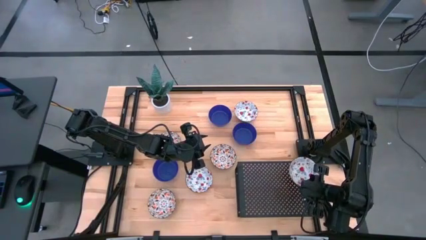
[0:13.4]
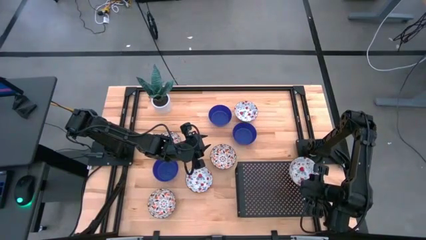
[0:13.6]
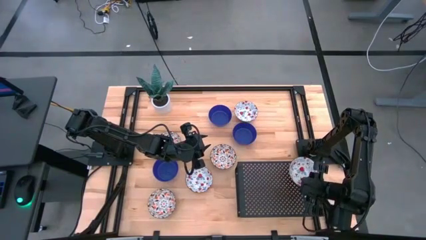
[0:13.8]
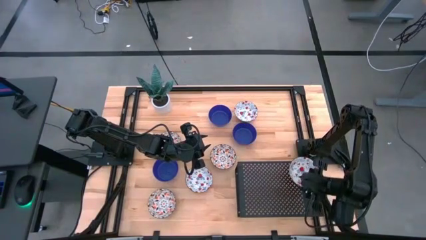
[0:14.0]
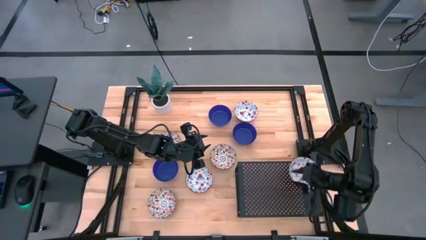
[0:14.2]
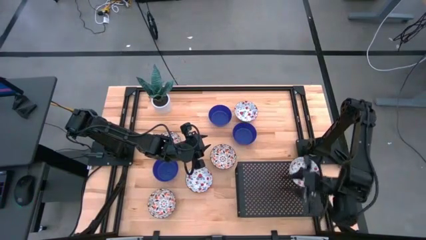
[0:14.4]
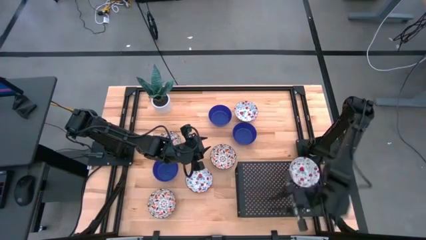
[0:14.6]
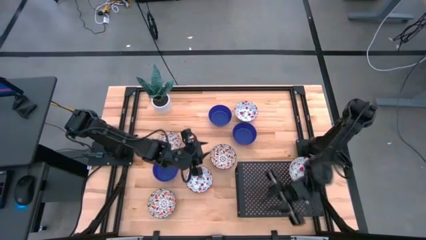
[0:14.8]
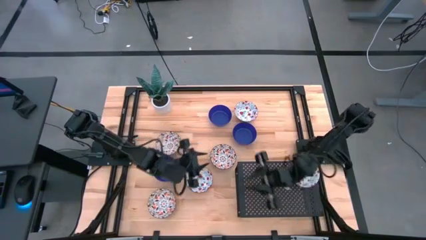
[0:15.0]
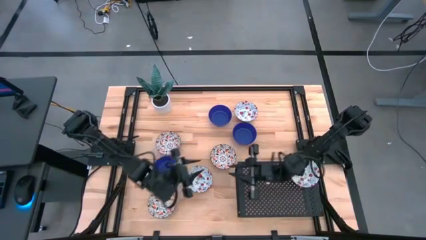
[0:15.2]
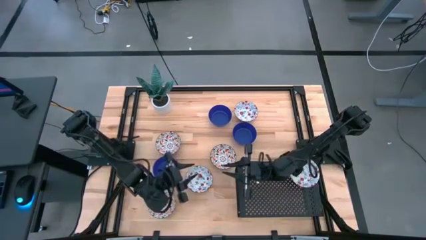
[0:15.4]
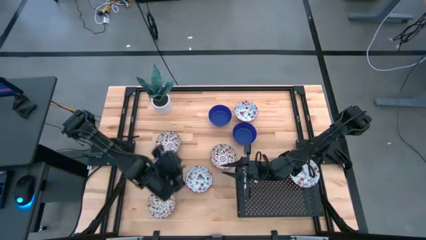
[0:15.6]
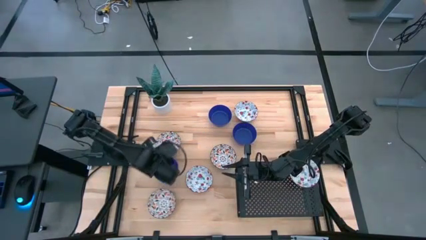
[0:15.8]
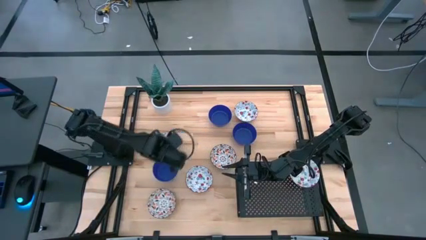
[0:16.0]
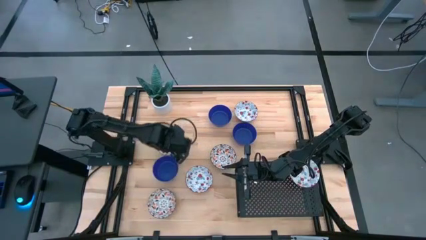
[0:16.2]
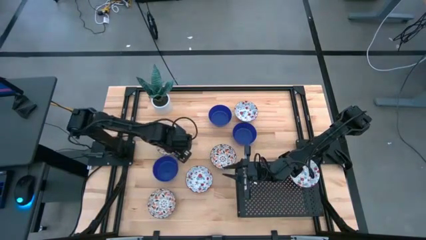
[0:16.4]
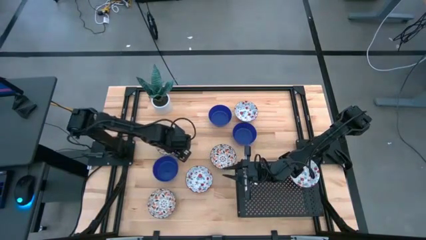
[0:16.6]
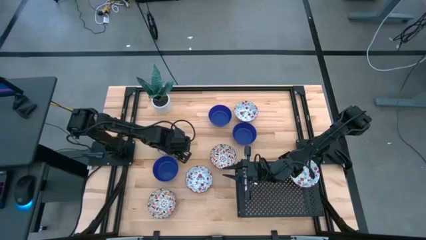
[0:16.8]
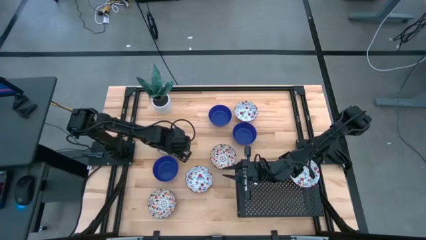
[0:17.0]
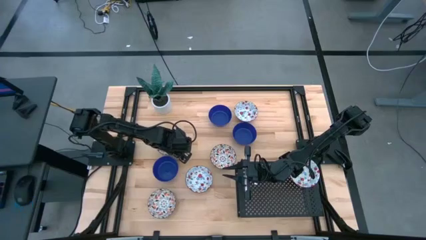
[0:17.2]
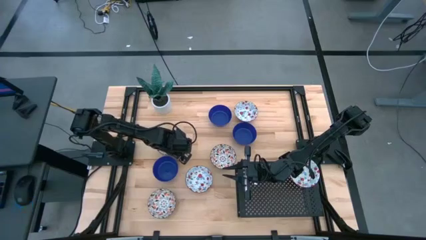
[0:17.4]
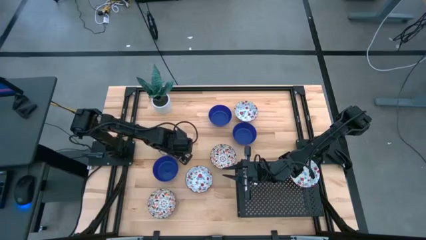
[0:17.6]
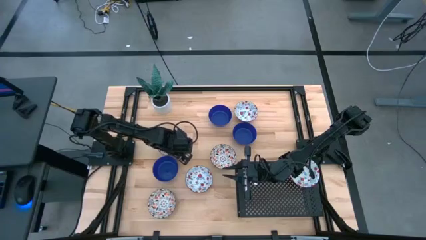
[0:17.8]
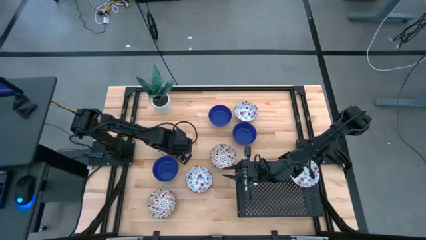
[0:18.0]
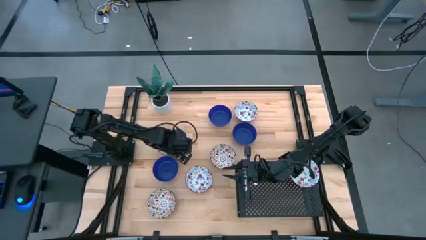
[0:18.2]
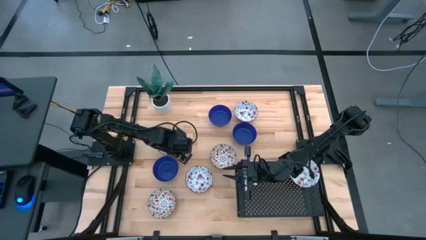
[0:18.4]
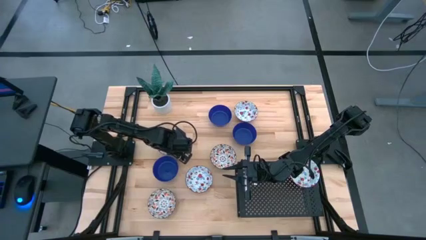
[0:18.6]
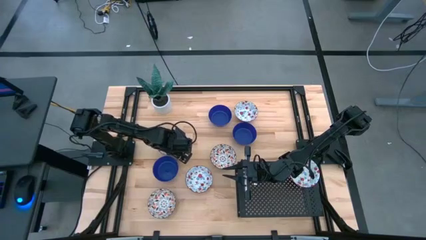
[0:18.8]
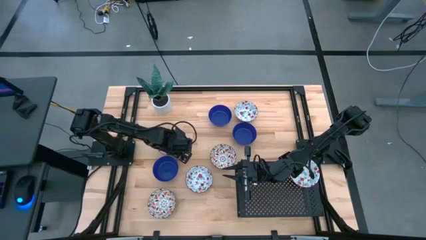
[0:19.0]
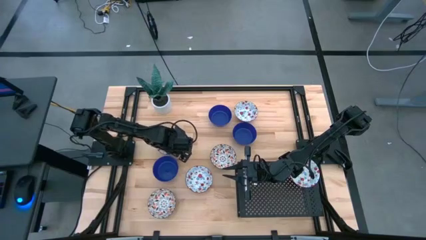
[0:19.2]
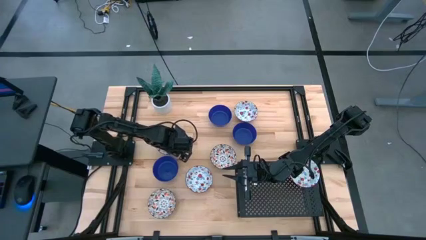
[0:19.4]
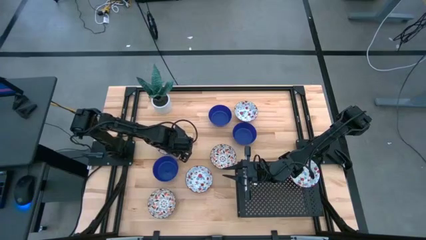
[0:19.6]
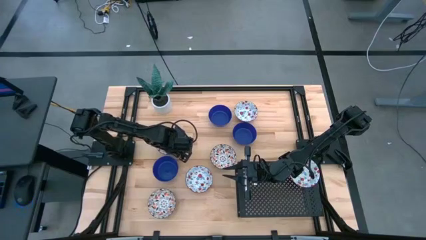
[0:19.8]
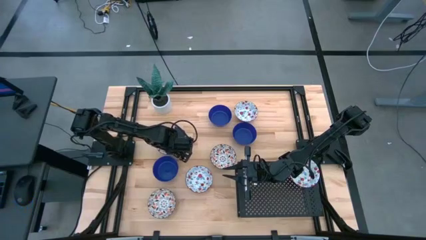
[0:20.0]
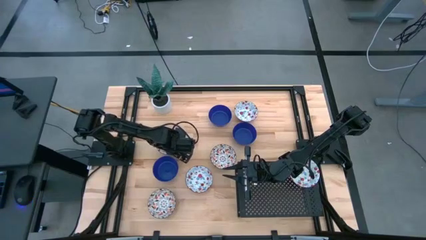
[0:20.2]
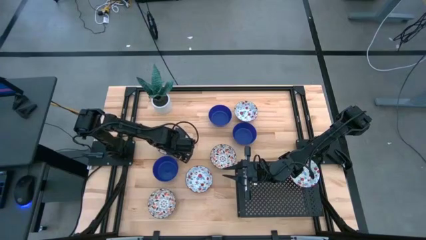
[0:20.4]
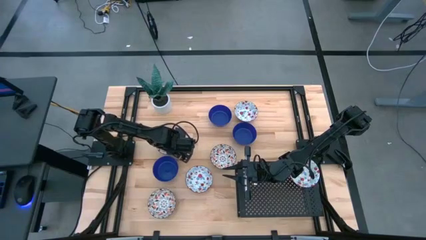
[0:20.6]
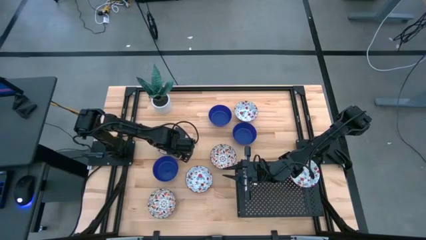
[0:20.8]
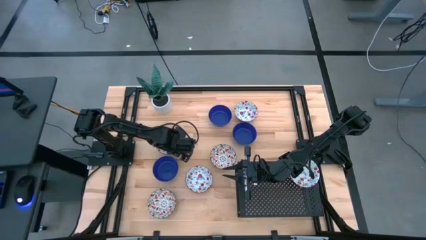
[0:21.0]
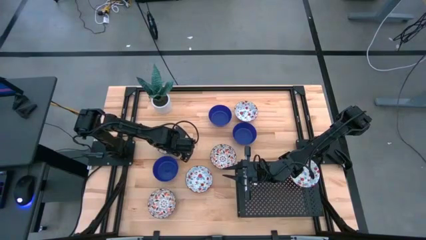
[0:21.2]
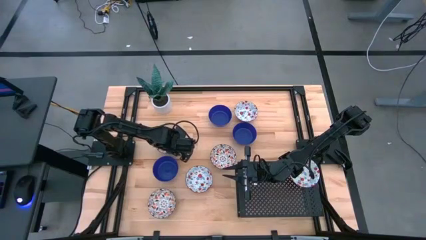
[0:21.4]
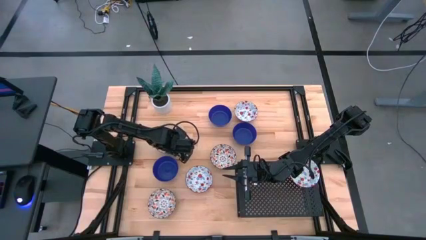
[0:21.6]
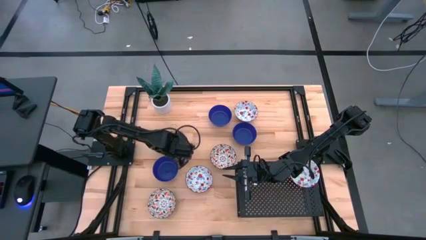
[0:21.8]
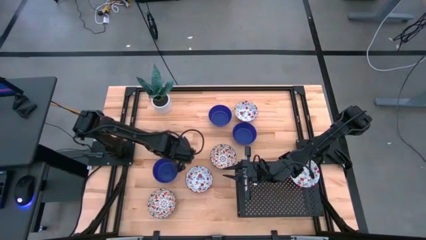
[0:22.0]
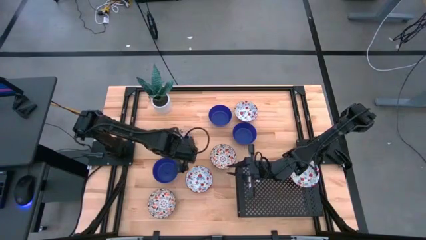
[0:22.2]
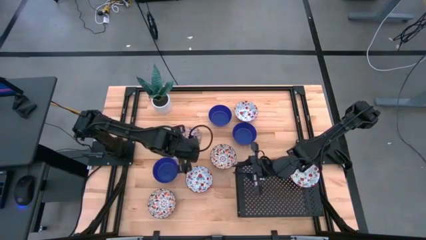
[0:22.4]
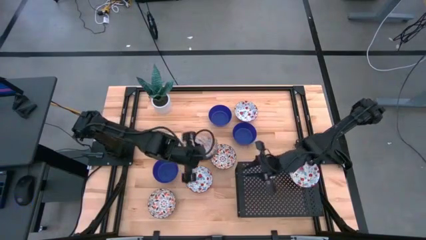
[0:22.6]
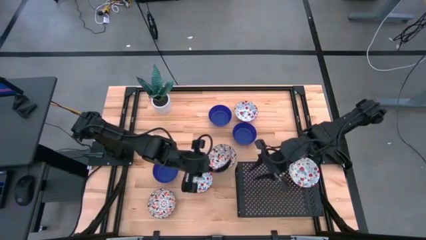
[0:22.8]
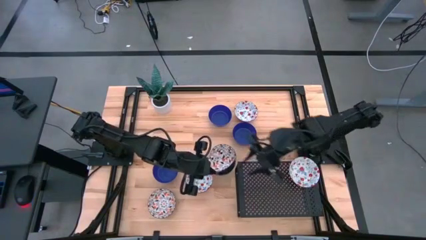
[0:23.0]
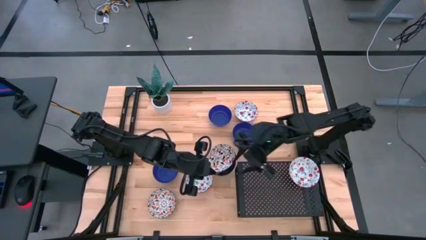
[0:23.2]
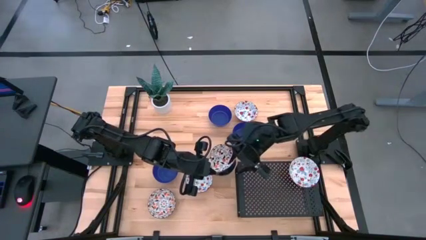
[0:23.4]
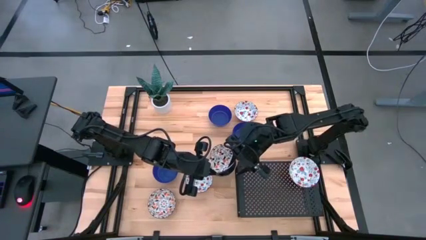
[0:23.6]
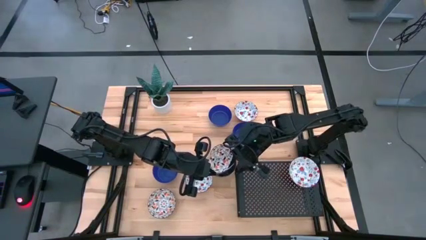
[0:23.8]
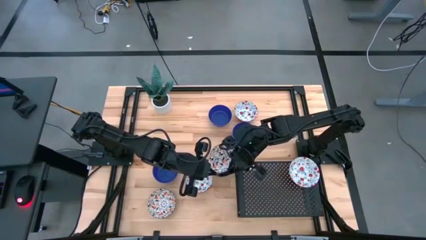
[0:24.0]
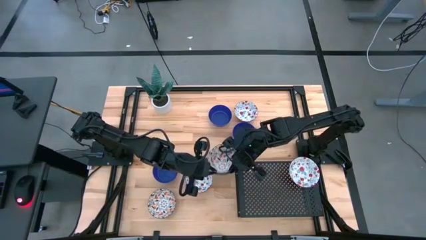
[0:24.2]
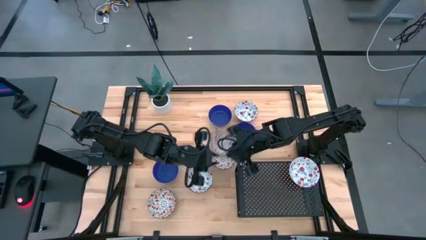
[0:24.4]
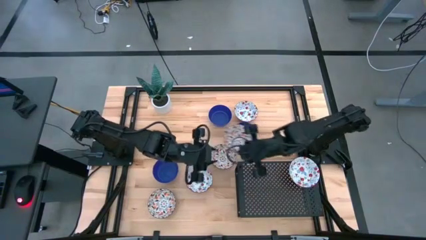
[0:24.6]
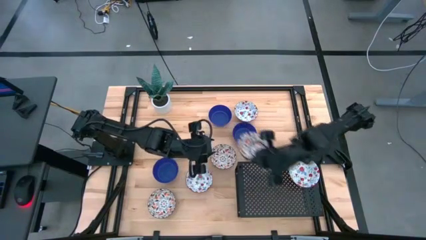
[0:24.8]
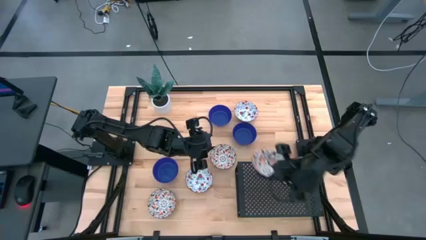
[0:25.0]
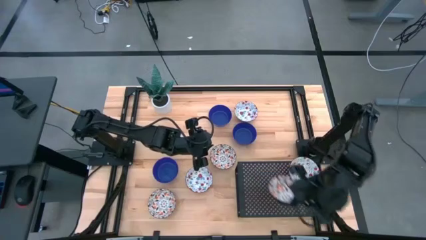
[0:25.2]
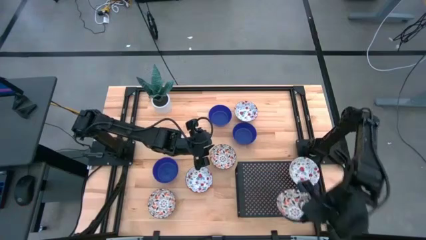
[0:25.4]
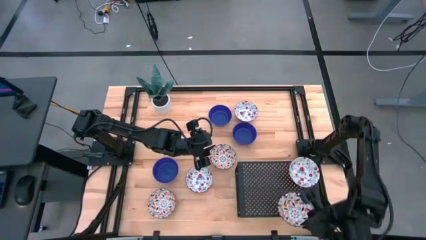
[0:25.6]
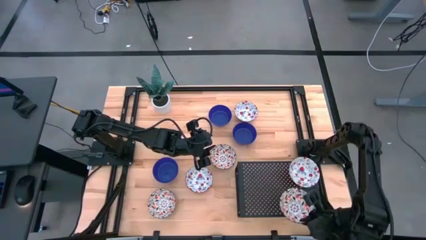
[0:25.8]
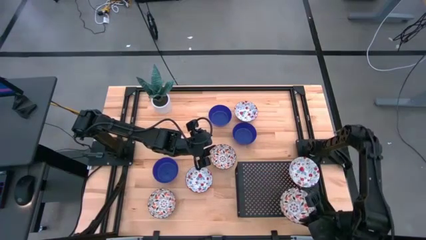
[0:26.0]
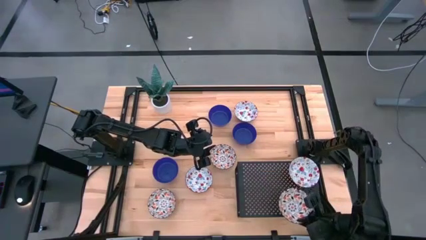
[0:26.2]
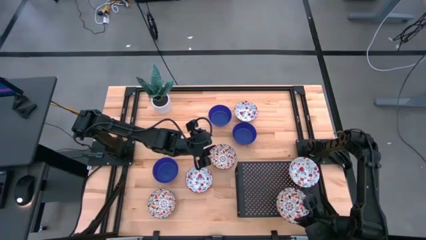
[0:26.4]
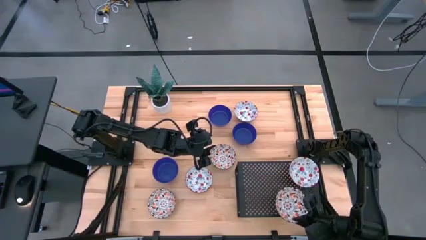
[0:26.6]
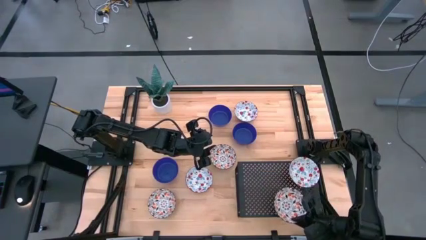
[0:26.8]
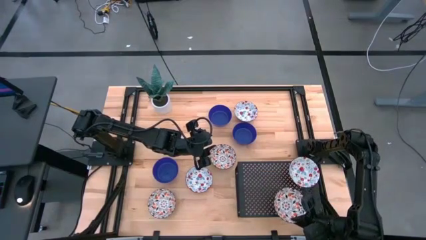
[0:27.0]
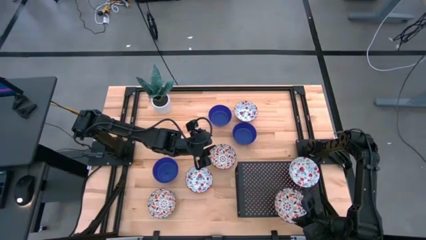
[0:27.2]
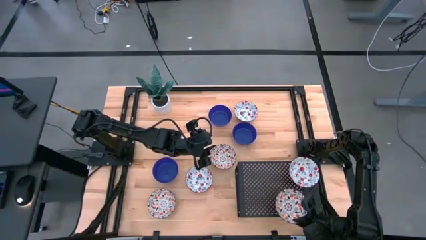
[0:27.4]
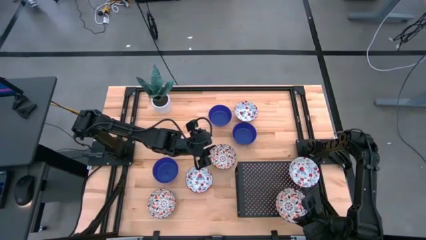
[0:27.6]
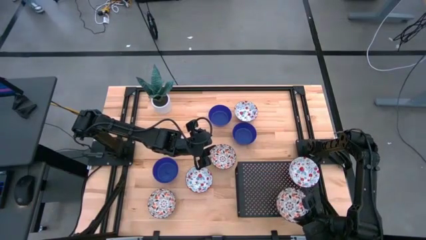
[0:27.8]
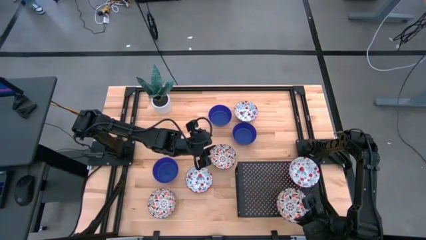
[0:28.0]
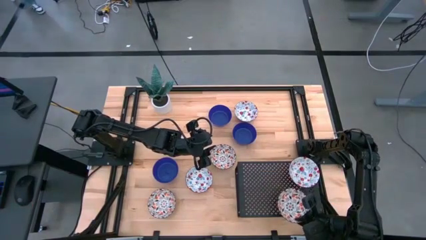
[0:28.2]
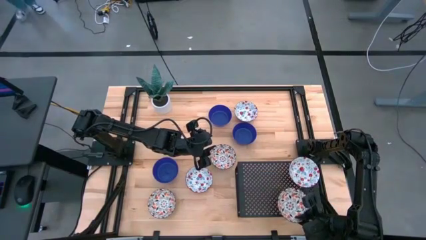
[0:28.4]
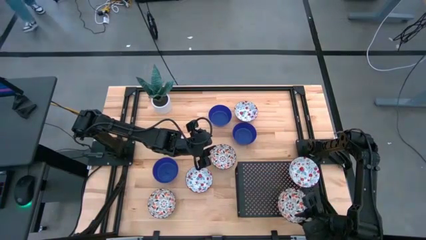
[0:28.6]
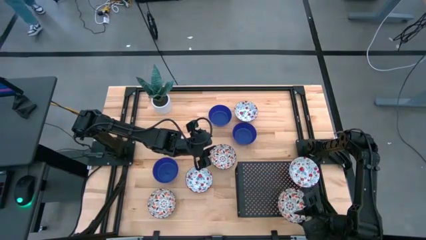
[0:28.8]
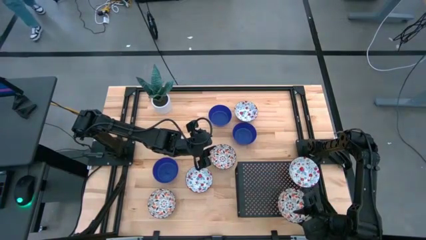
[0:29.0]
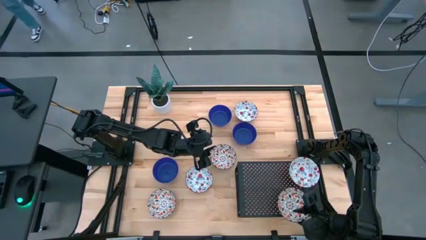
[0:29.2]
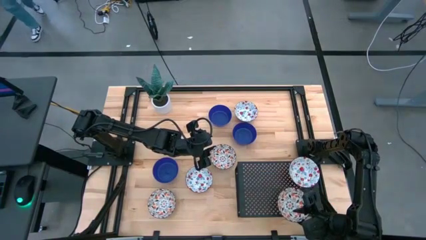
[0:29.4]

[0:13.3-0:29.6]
Task: Pick & Place Mini bowls
Put the top left orange patterned bowl on the shelf
